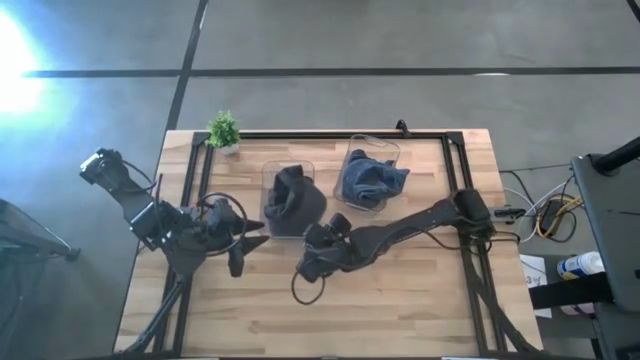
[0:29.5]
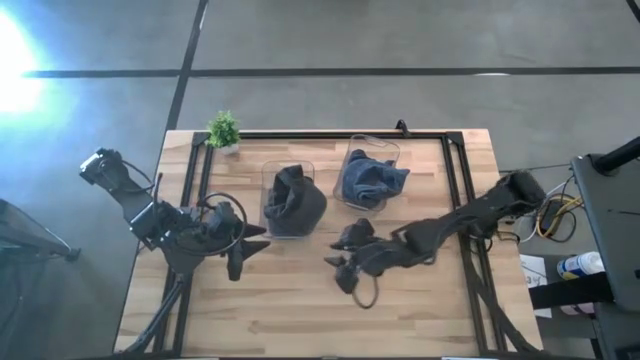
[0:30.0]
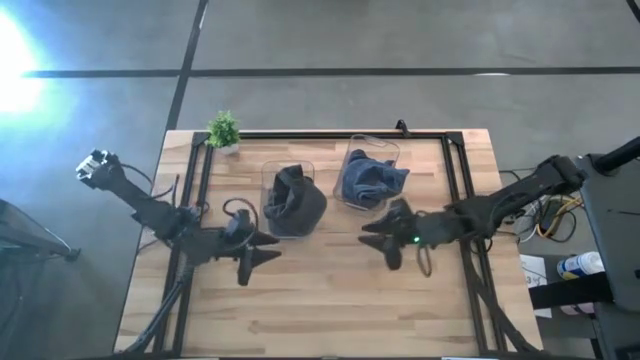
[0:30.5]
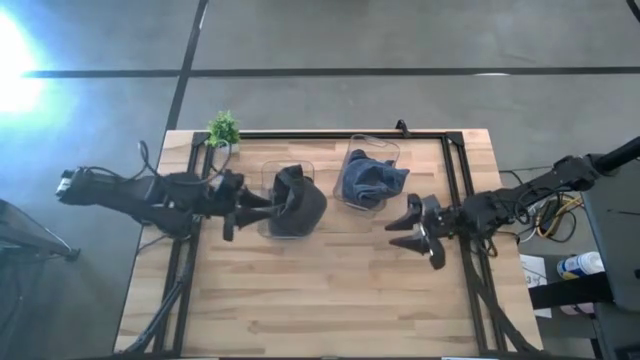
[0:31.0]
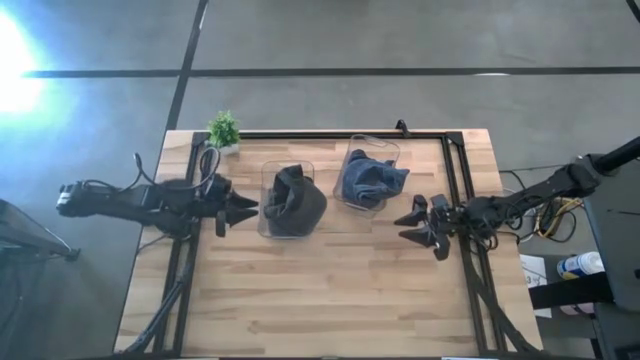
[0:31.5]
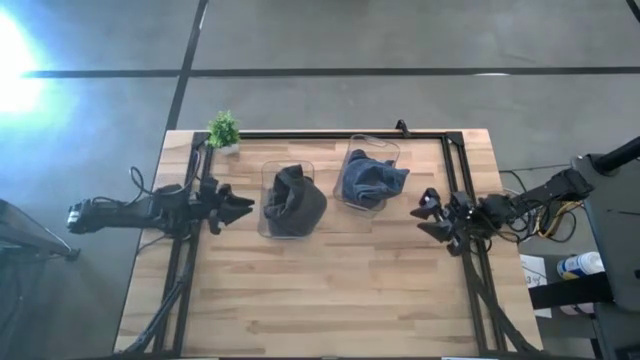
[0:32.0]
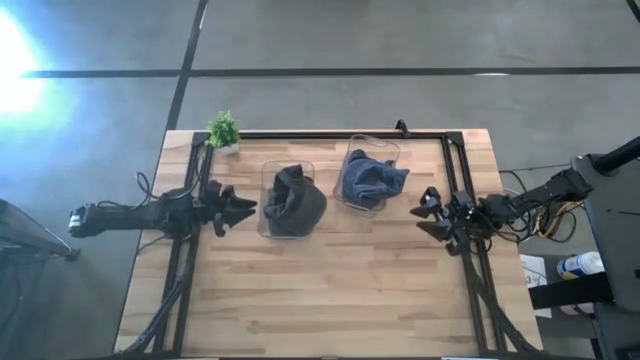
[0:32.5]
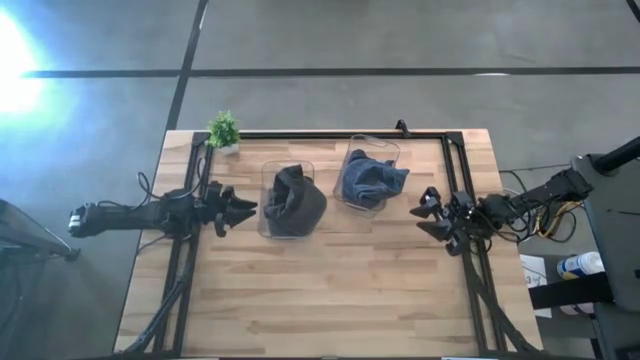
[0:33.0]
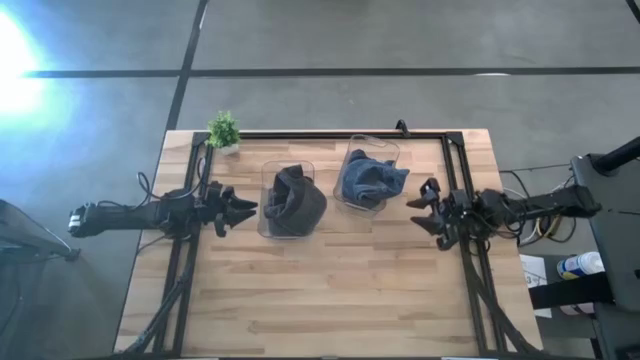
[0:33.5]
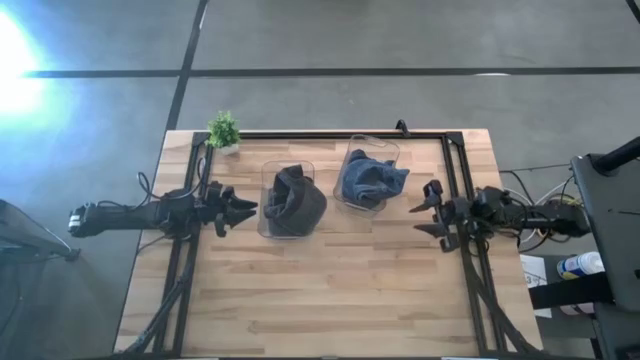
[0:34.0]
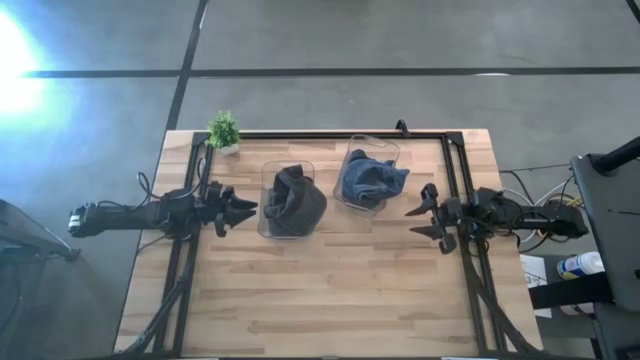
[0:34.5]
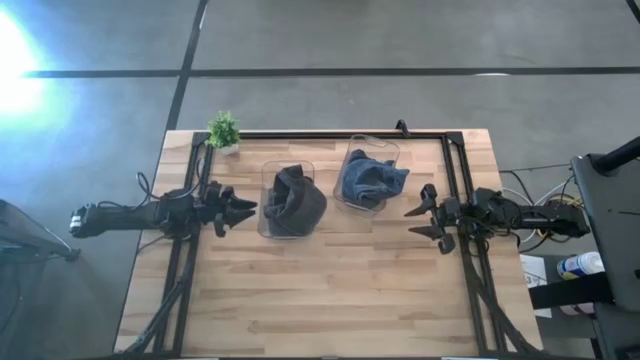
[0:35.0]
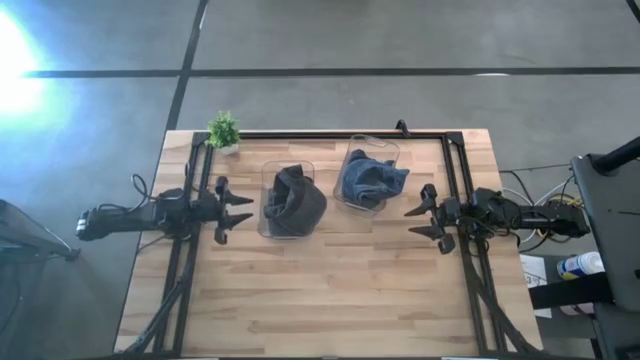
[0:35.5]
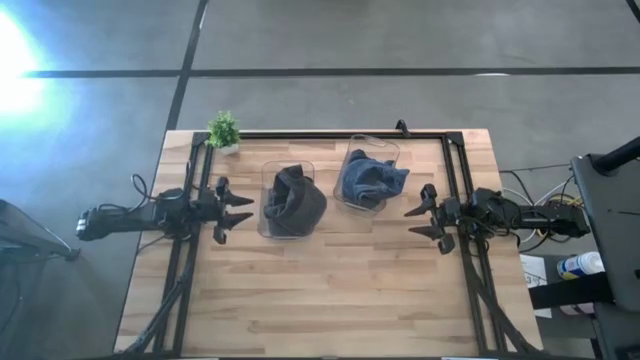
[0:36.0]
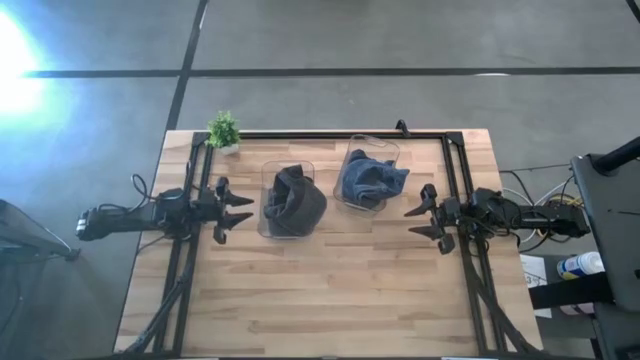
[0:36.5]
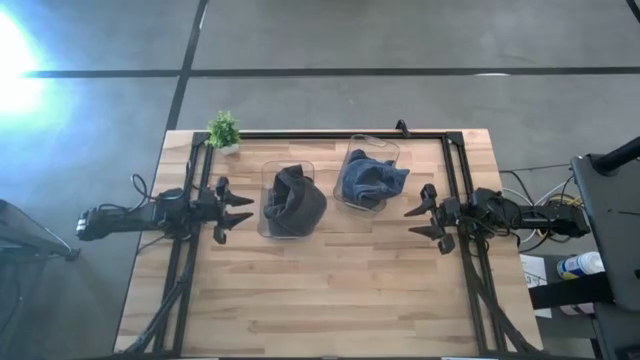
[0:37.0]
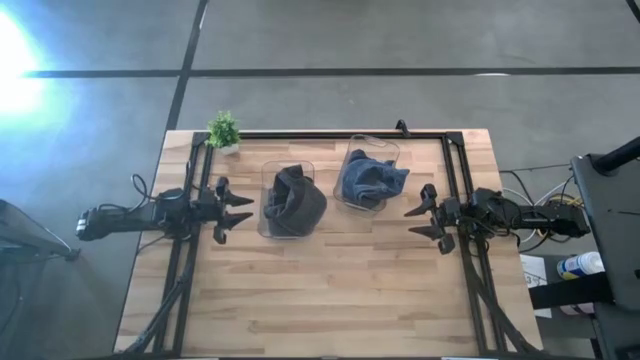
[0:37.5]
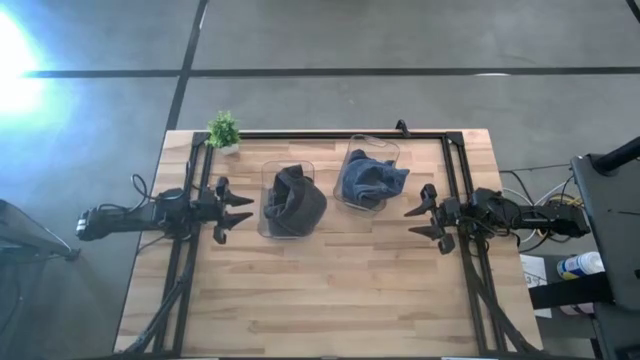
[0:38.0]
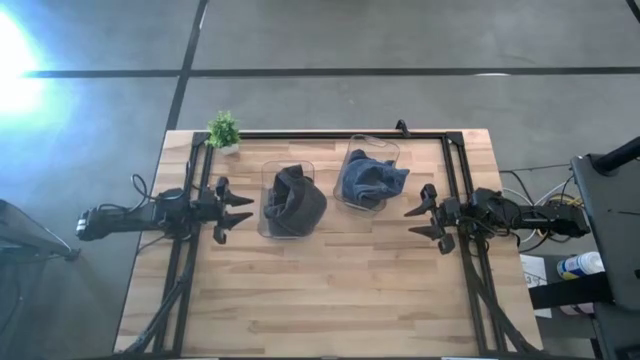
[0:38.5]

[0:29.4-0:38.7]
Task: Pick & Place hat
Return to Home Position

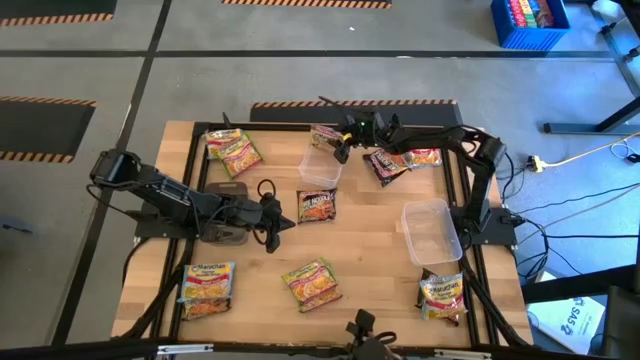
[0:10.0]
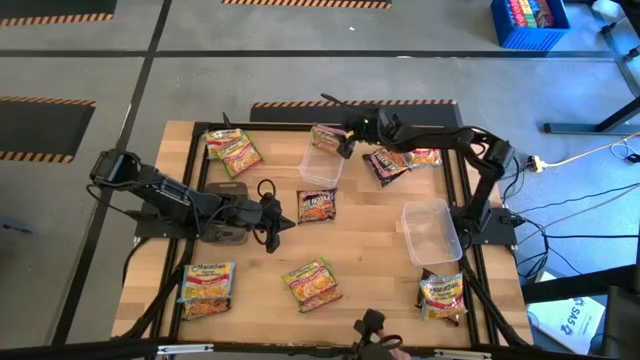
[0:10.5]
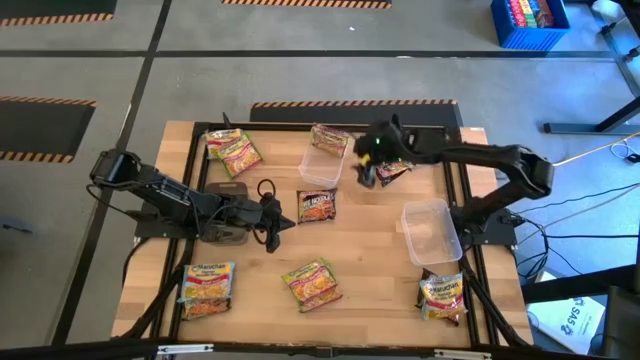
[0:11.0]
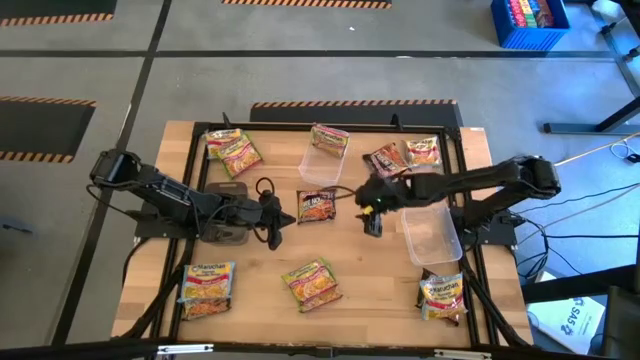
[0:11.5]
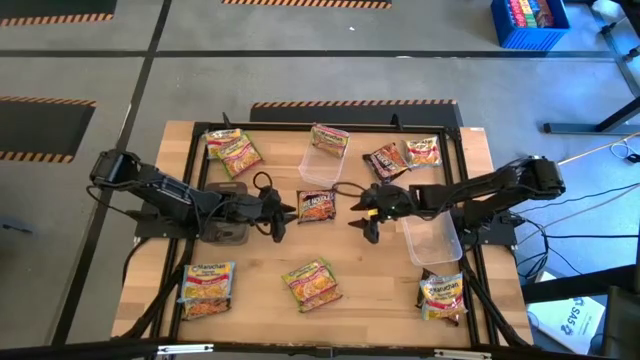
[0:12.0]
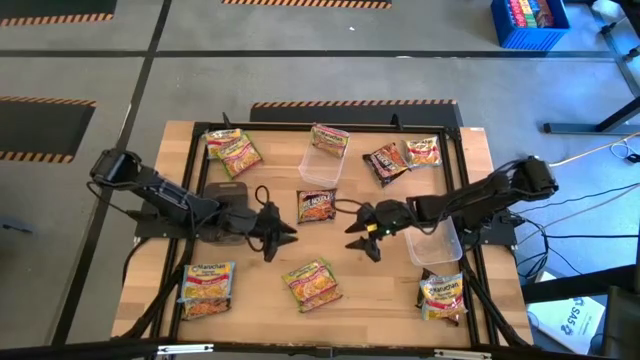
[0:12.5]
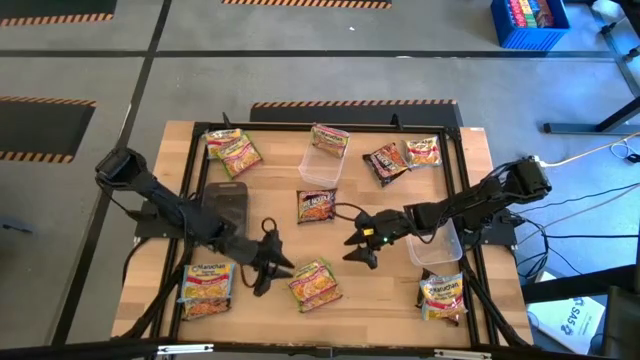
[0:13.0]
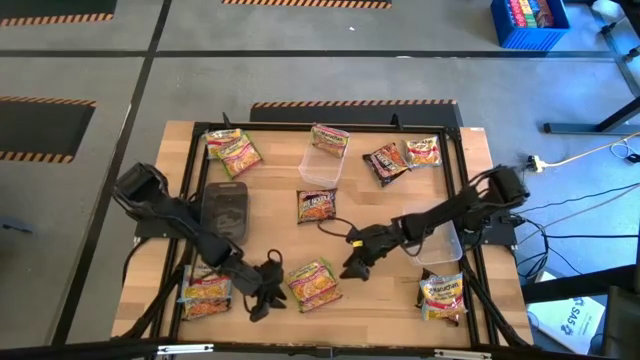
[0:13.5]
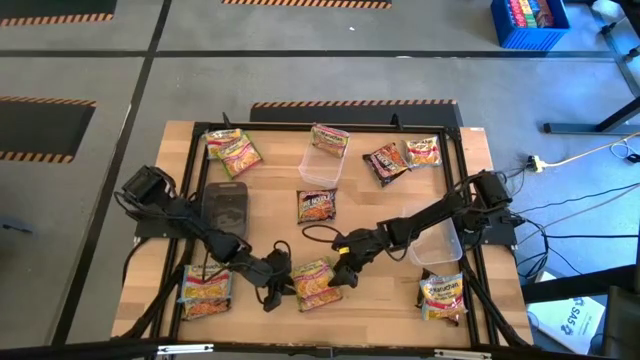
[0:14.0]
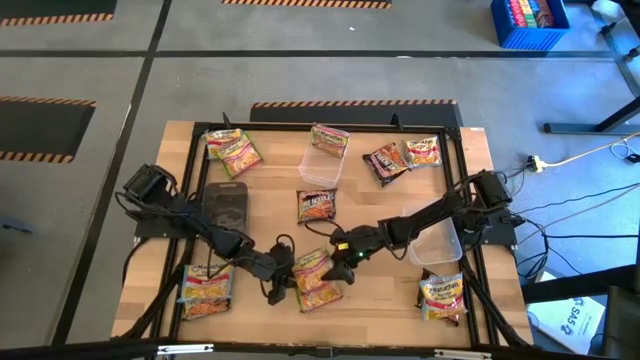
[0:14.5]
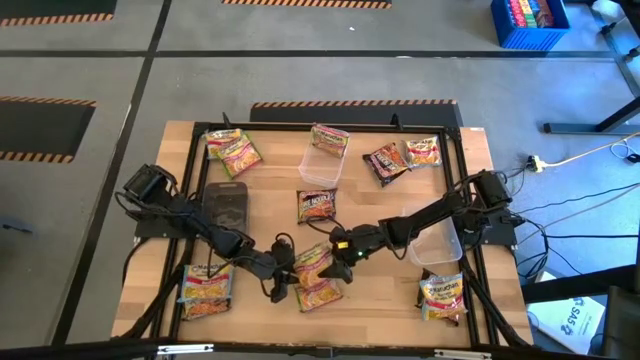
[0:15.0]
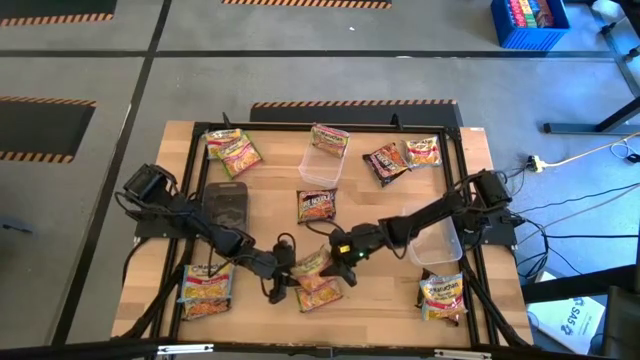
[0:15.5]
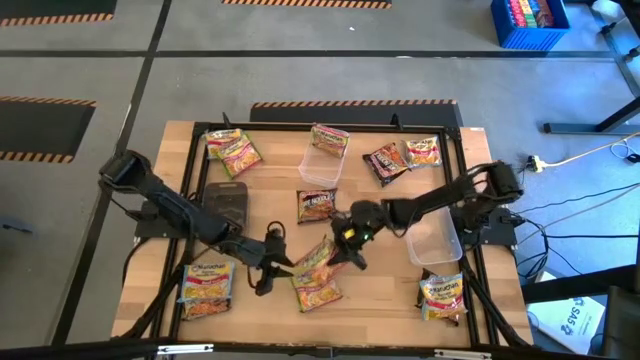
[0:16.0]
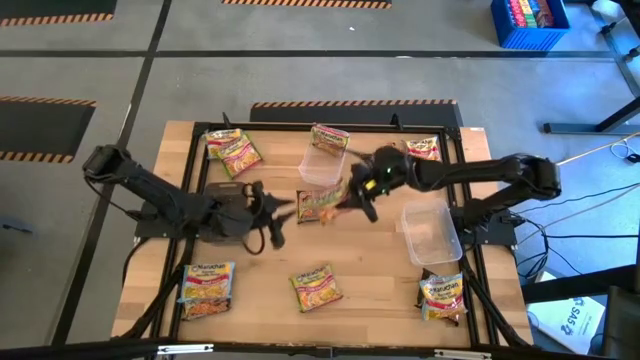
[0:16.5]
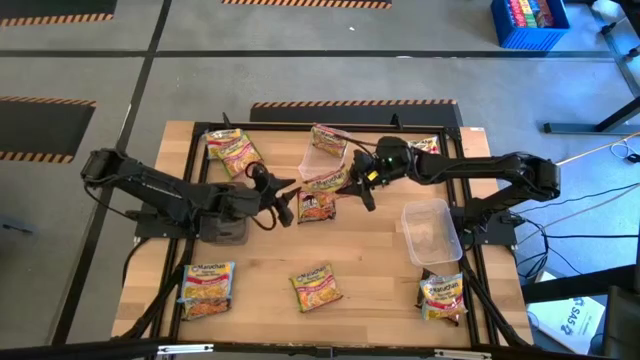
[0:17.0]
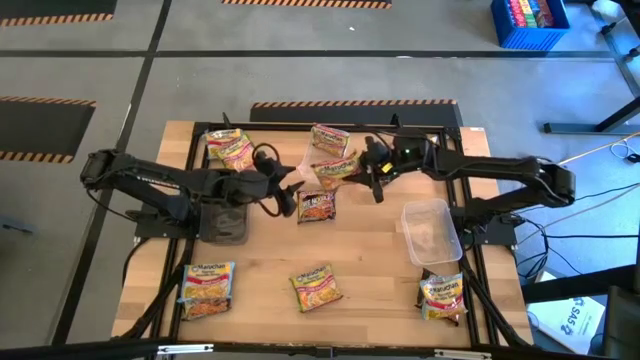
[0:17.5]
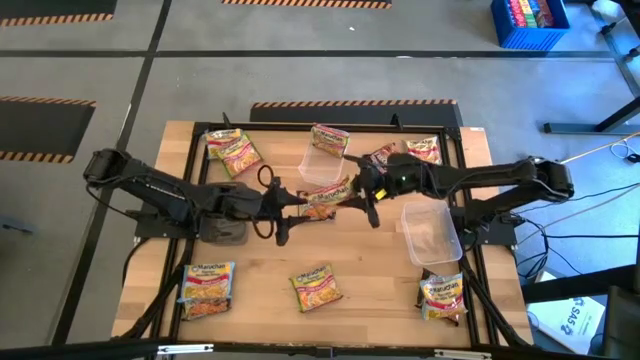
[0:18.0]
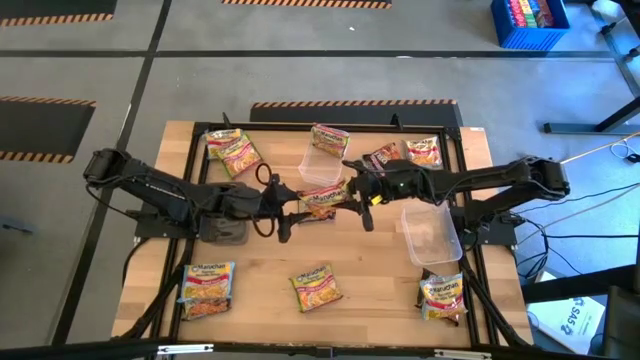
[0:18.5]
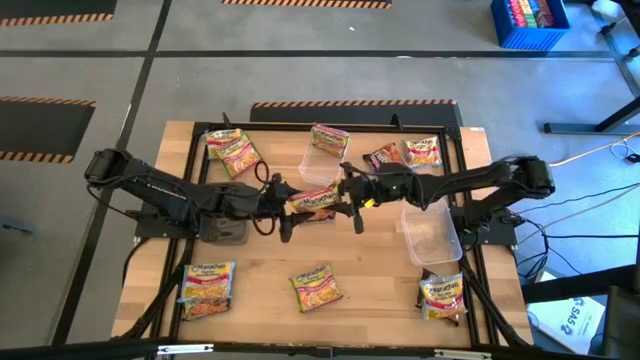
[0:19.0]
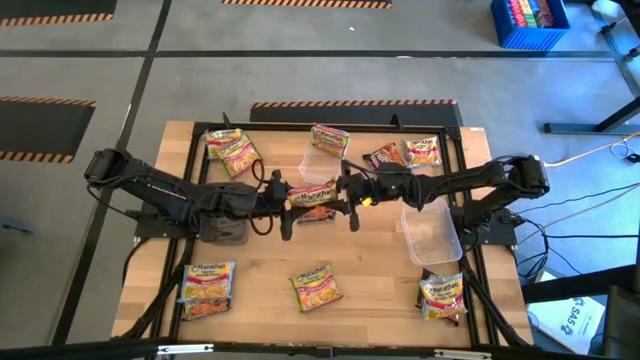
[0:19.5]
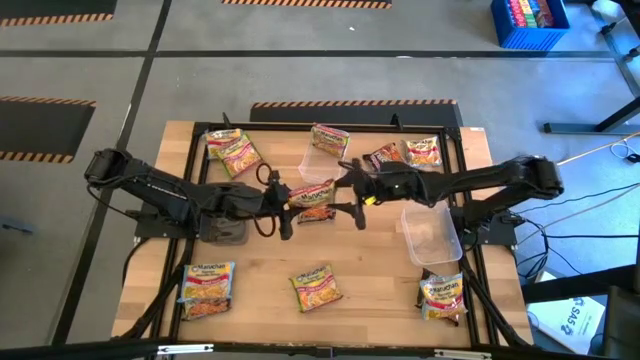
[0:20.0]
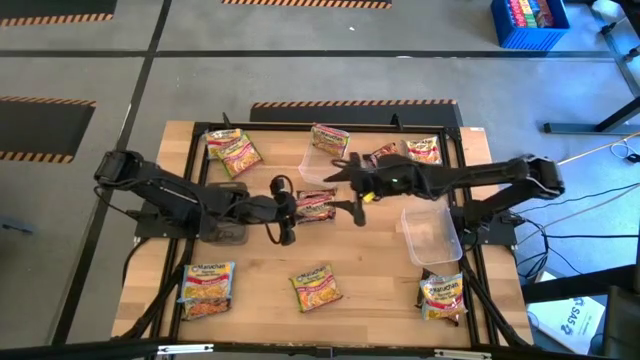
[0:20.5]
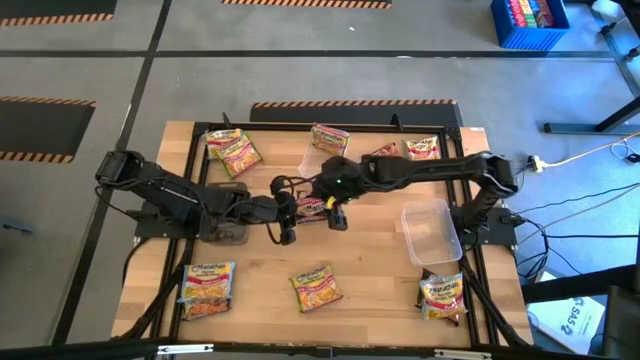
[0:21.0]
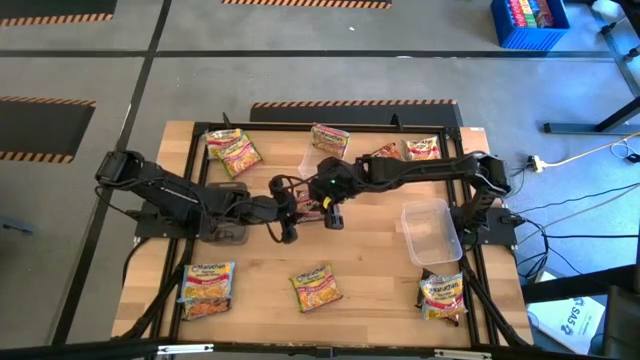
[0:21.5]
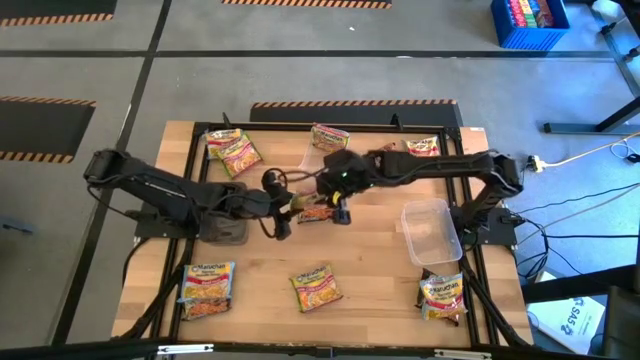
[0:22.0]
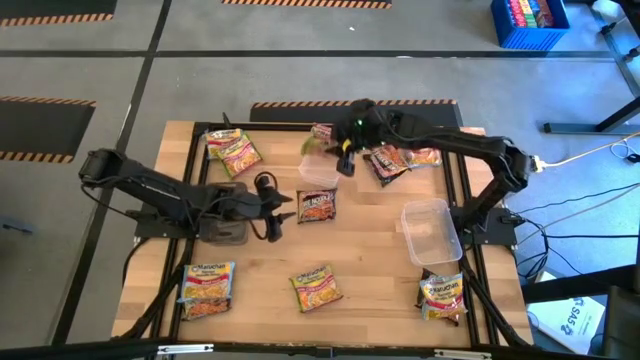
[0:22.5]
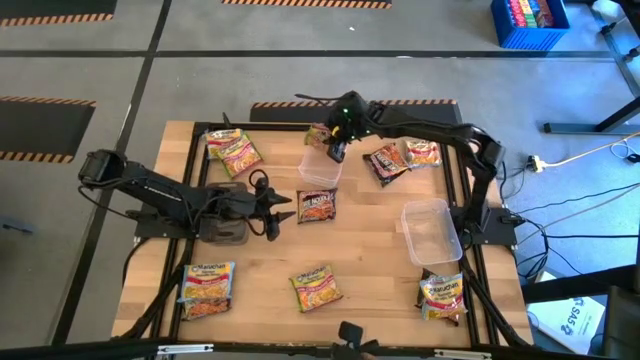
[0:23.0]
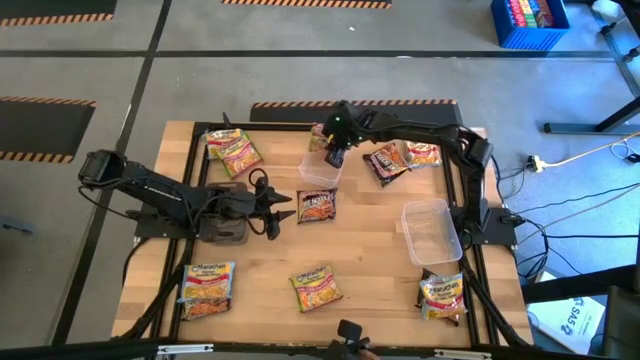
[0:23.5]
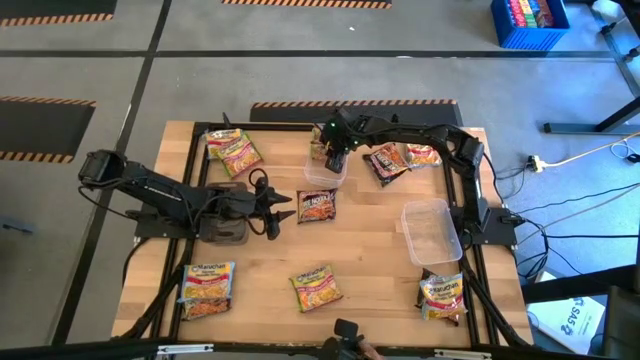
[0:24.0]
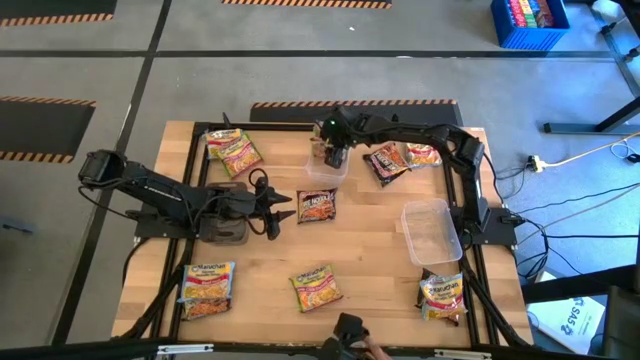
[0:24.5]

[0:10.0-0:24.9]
Task: Sort Maruchan noodles
Put the bottom green noodle pack into the top transparent bin
